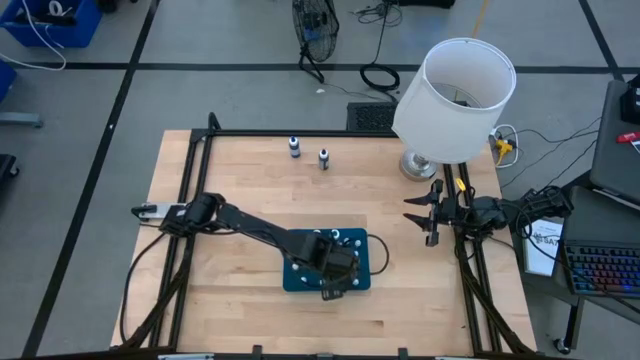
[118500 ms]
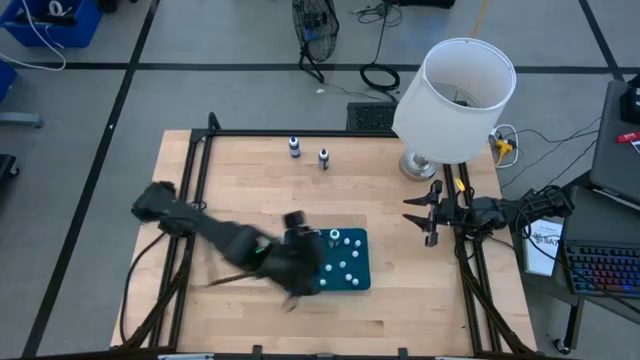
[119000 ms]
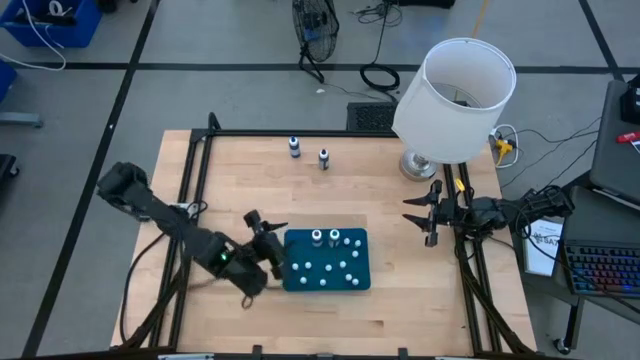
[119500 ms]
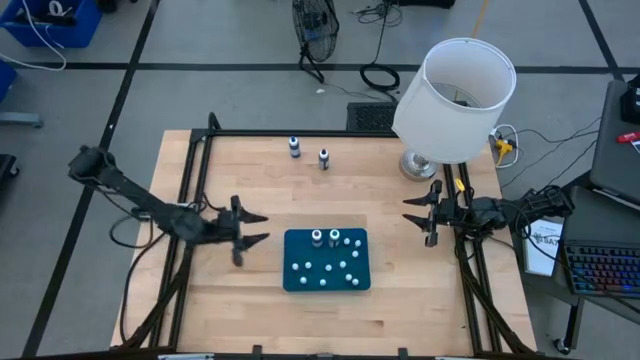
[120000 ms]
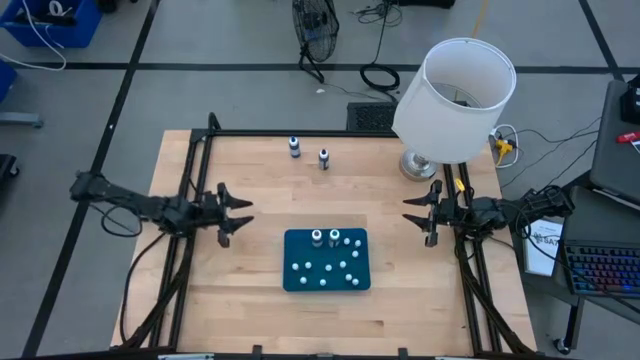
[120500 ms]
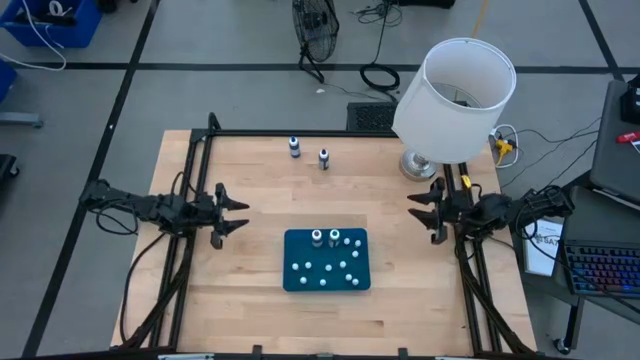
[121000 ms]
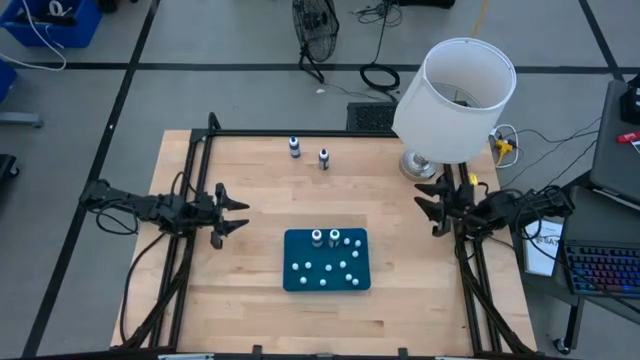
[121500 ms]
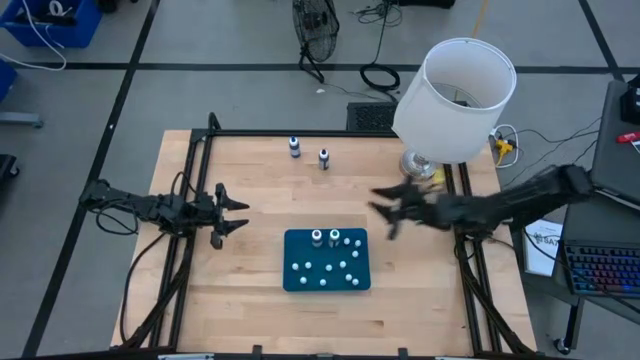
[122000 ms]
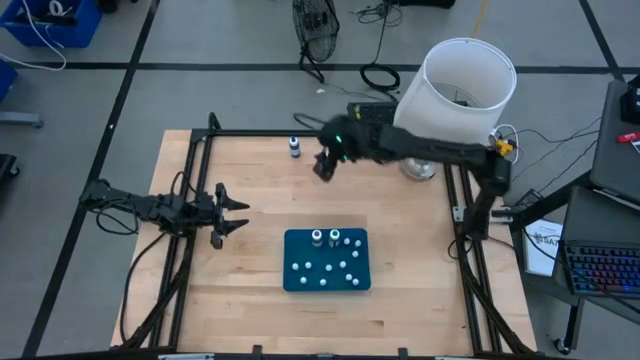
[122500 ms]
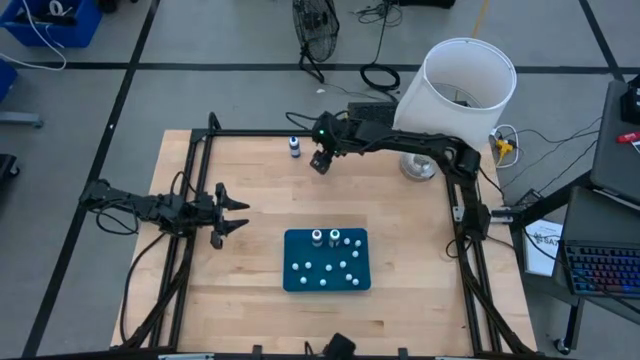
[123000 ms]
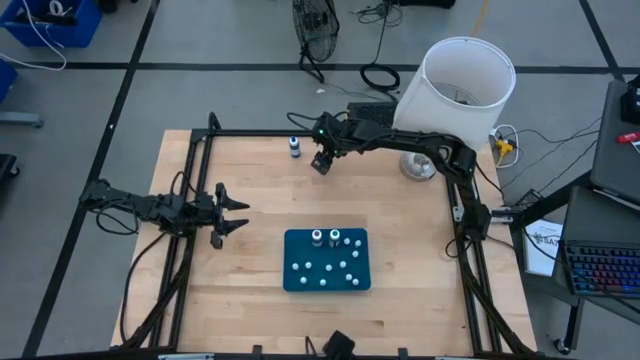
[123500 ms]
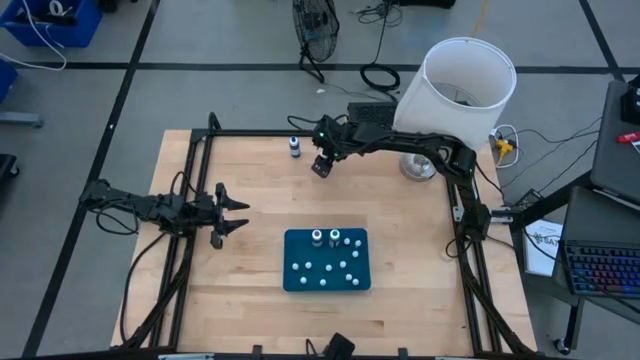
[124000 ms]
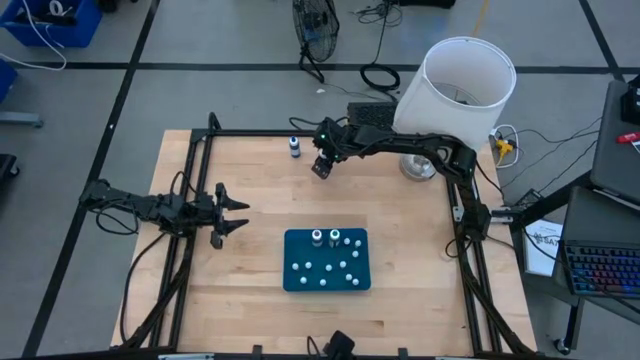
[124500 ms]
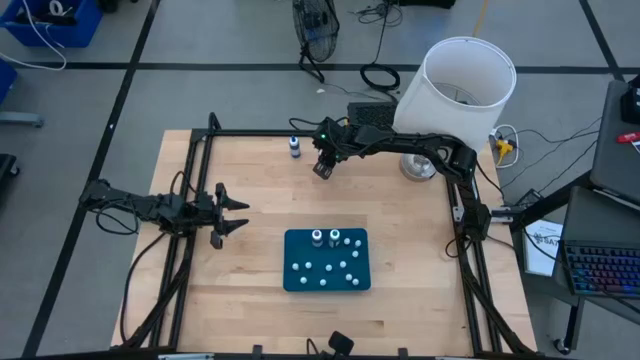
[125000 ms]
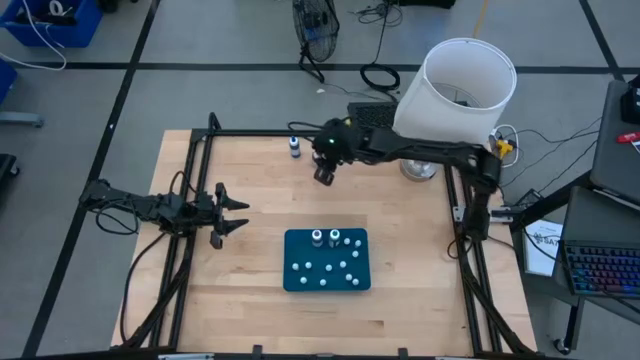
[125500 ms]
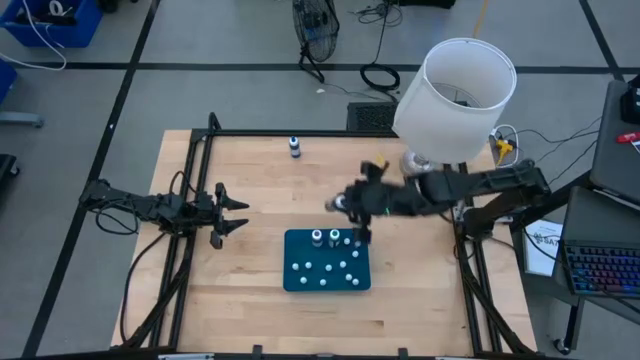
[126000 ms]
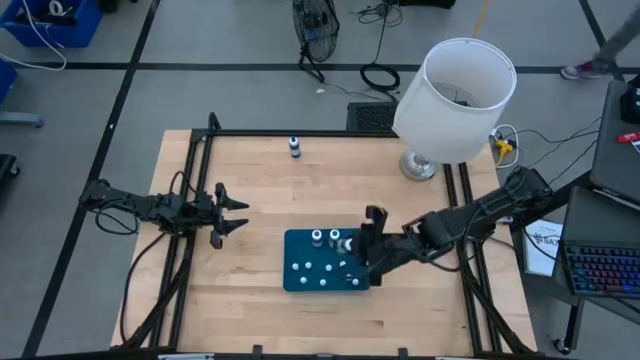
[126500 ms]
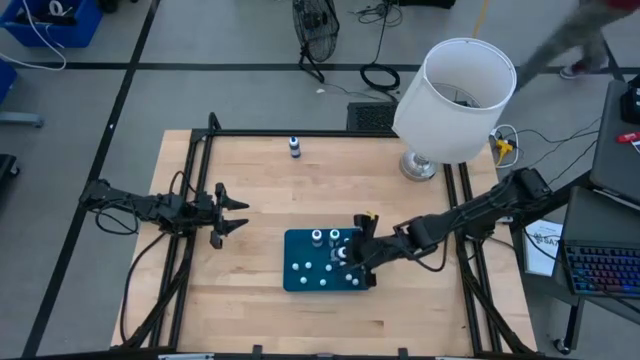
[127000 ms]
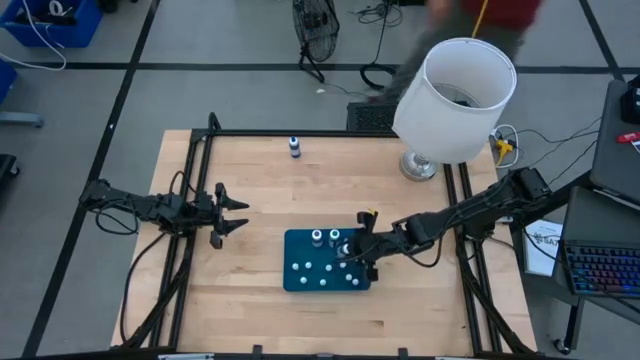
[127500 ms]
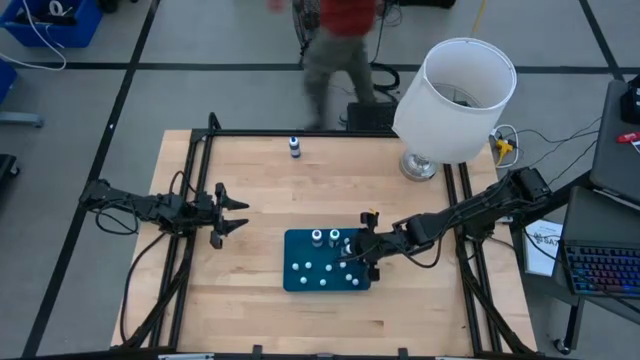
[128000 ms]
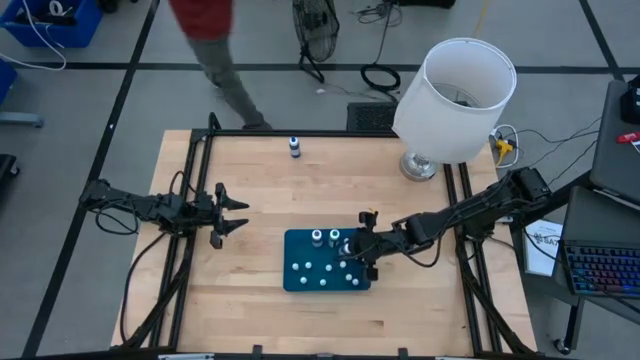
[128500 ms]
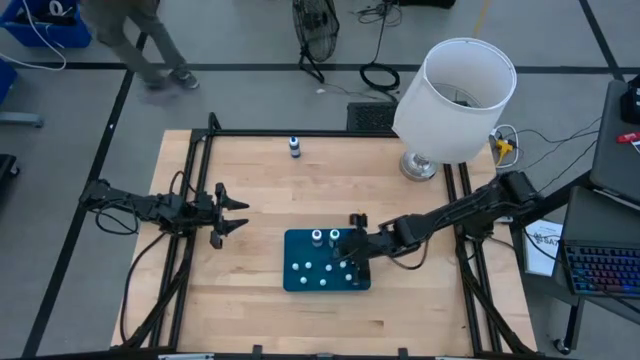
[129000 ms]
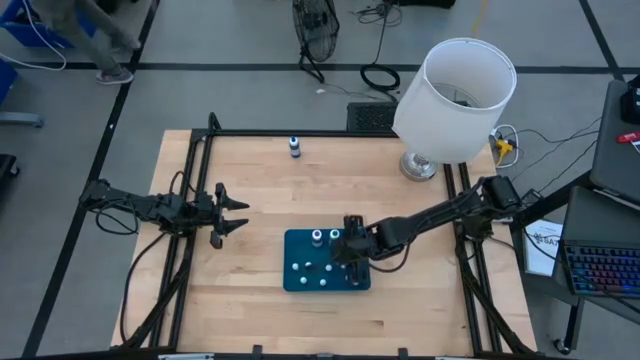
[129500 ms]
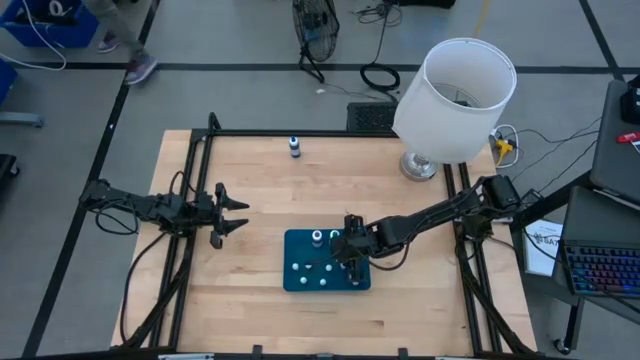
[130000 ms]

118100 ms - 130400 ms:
Task: Pick & Place food coloring
Put the large black food coloring bottle into the blue bin

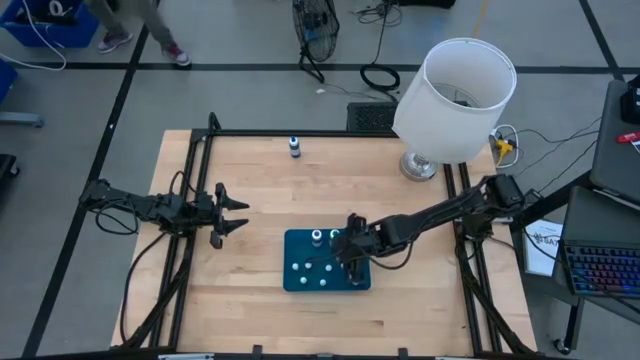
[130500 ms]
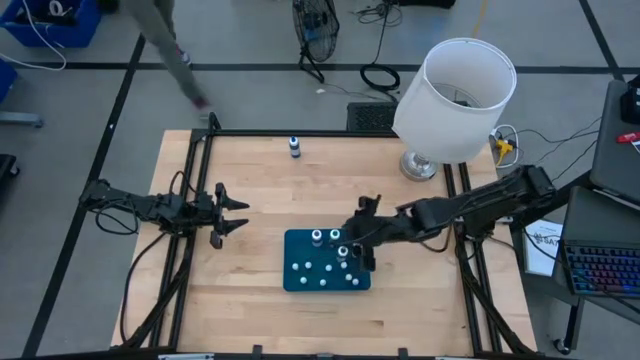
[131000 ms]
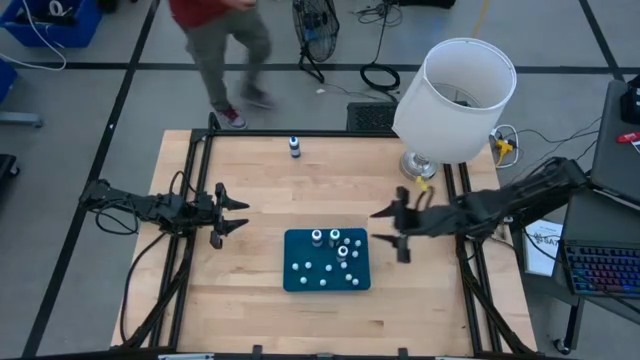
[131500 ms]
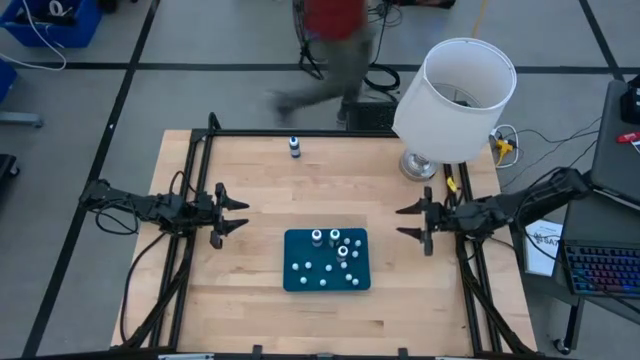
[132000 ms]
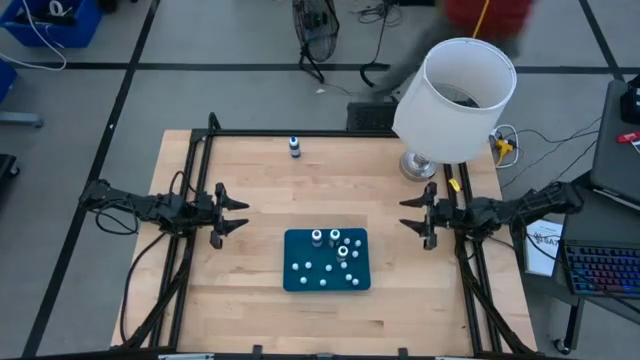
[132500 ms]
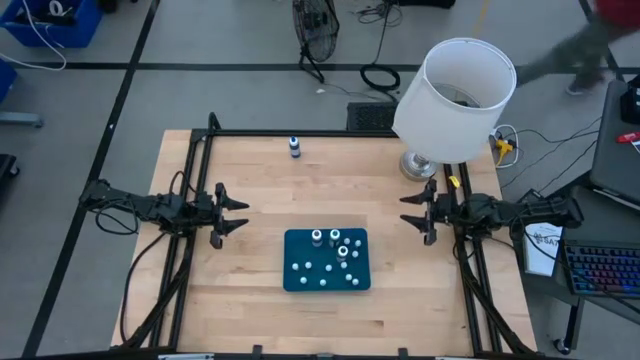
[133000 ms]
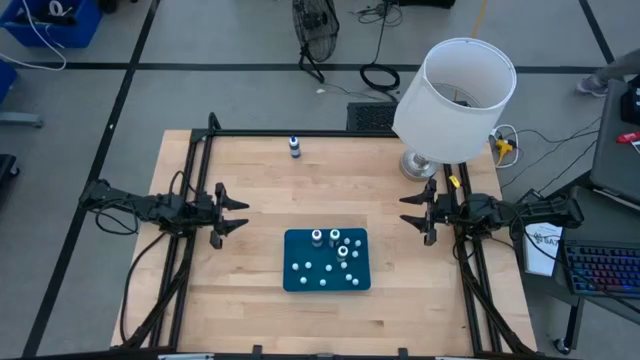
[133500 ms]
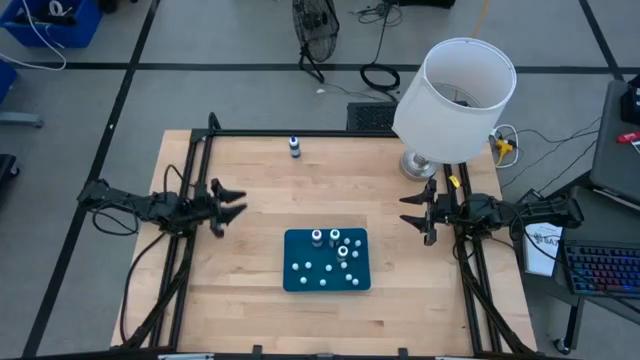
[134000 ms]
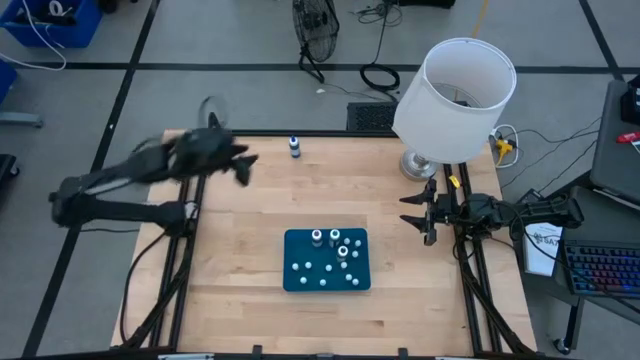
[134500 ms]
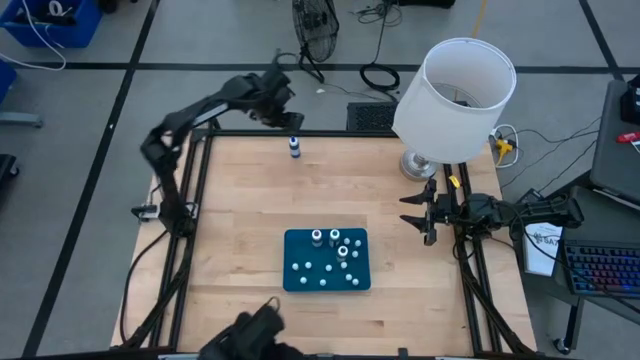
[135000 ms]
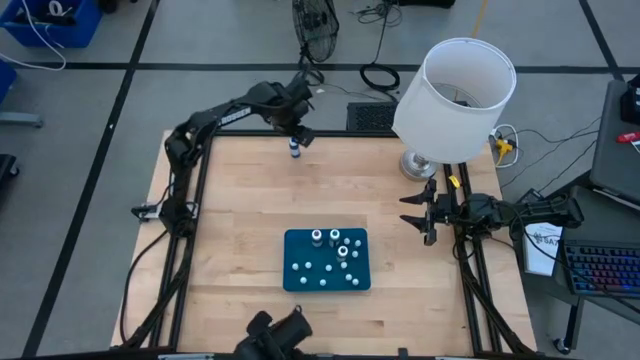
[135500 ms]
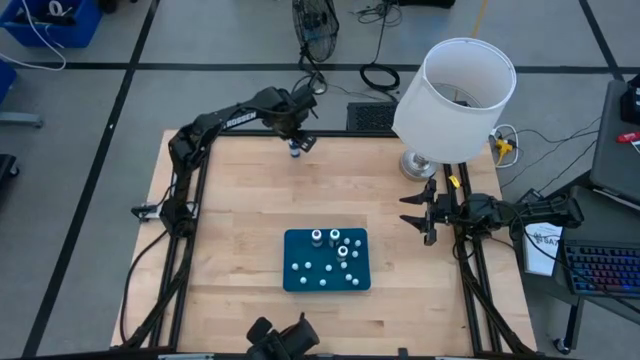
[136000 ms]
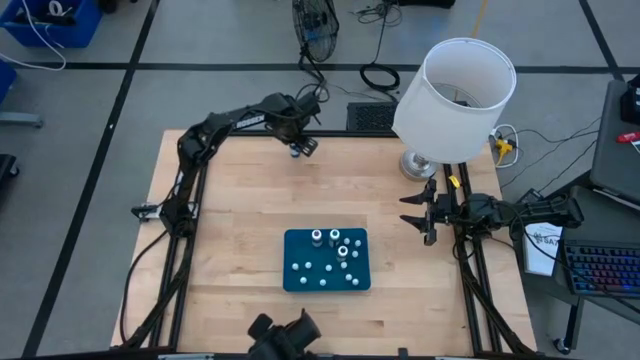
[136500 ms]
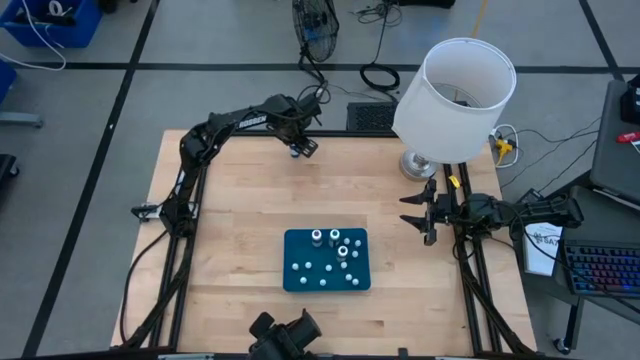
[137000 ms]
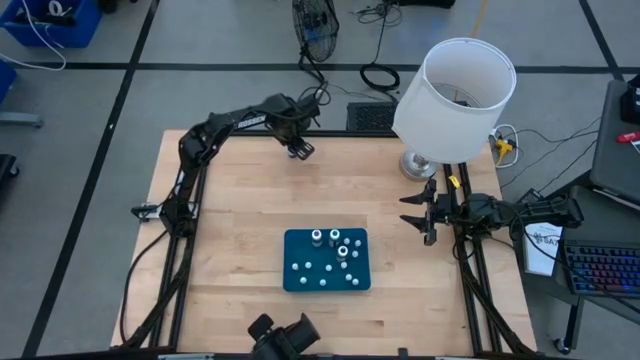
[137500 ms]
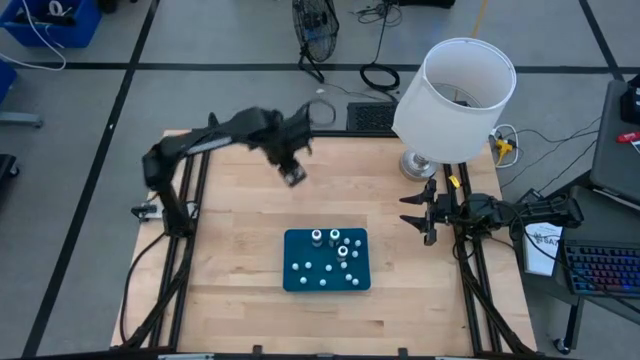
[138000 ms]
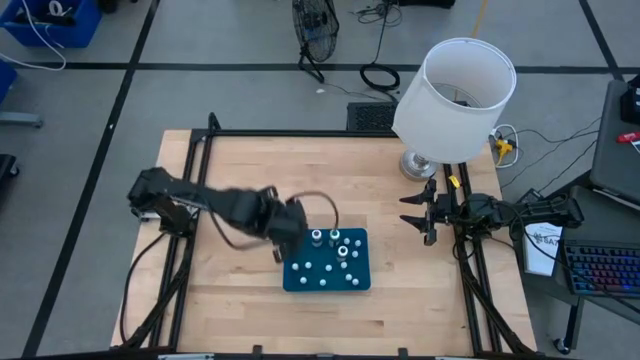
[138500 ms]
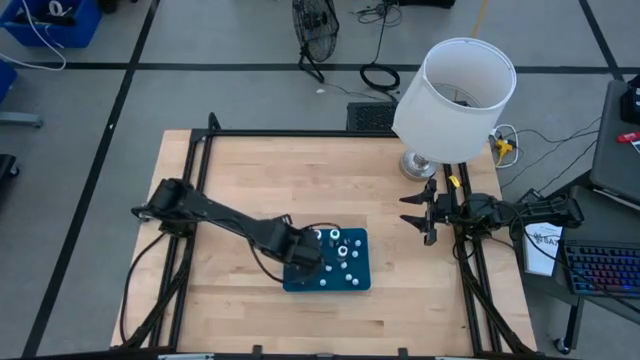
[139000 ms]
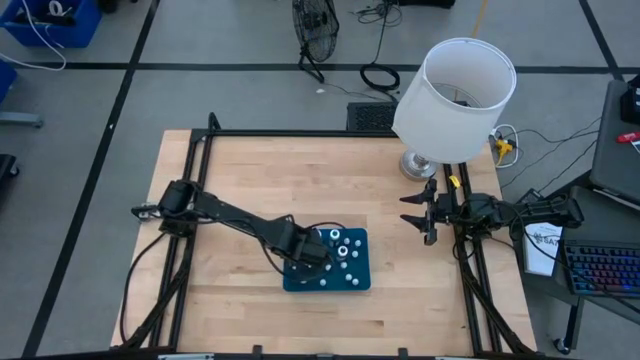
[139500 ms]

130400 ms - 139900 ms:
Put the large blue food coloring bottle into the blue bin
